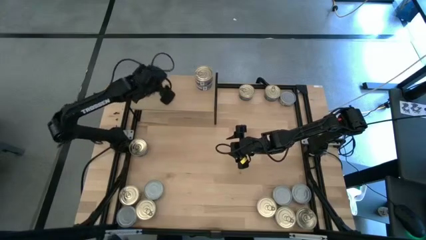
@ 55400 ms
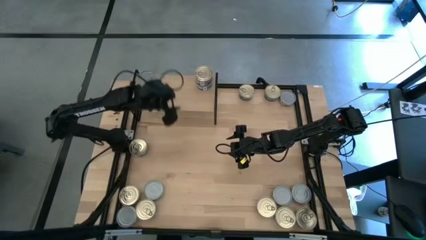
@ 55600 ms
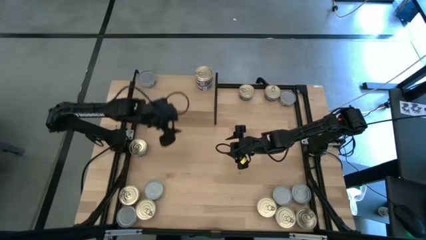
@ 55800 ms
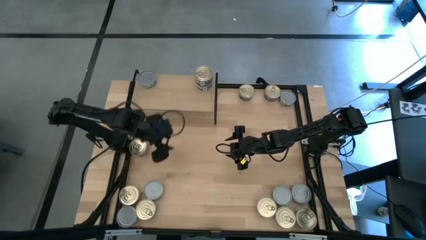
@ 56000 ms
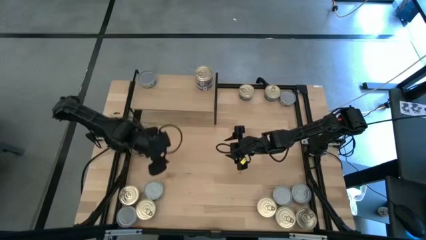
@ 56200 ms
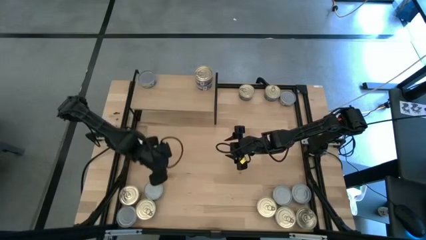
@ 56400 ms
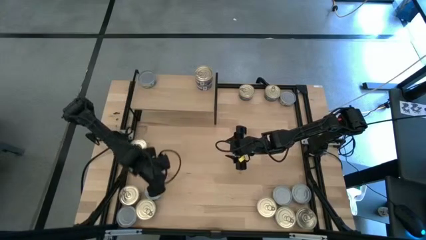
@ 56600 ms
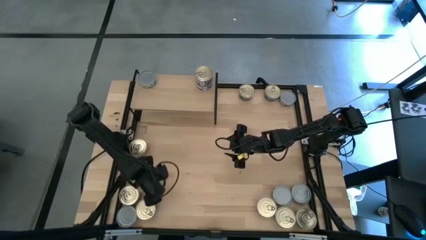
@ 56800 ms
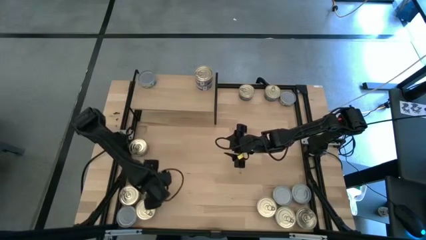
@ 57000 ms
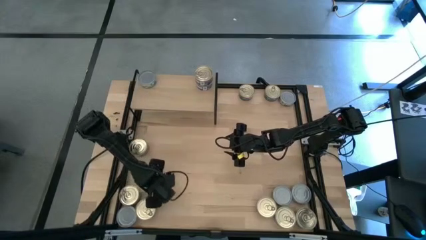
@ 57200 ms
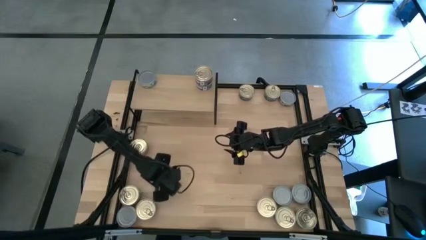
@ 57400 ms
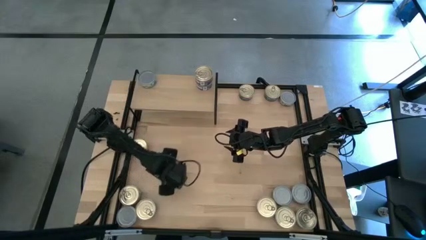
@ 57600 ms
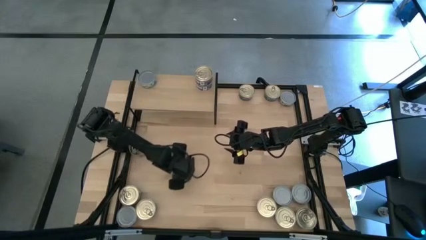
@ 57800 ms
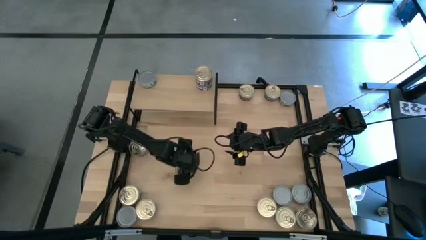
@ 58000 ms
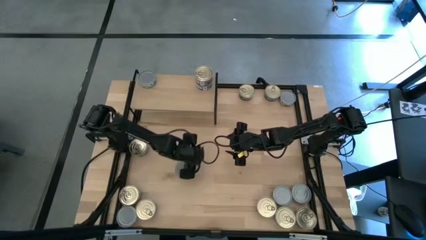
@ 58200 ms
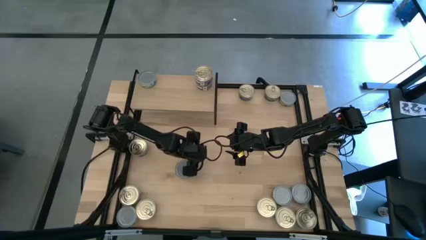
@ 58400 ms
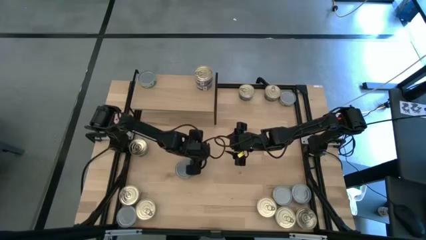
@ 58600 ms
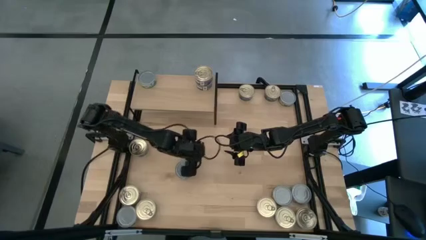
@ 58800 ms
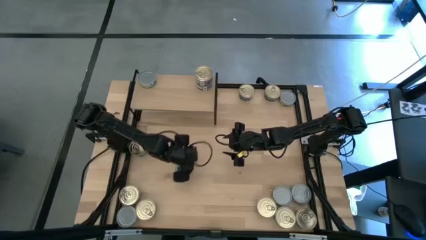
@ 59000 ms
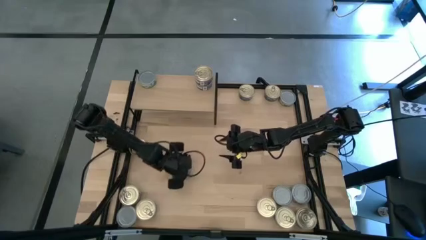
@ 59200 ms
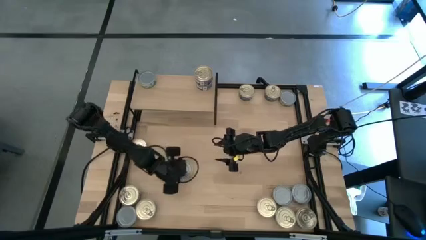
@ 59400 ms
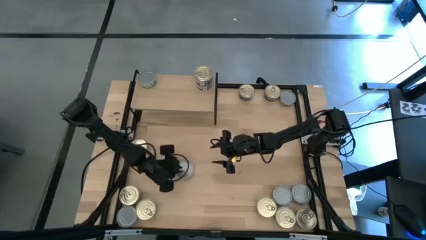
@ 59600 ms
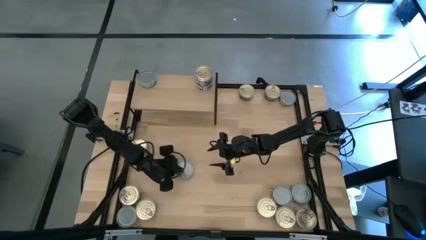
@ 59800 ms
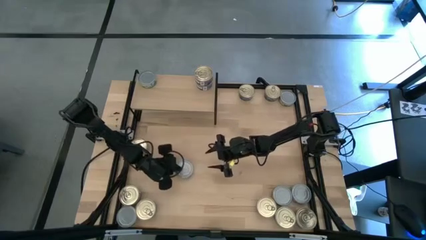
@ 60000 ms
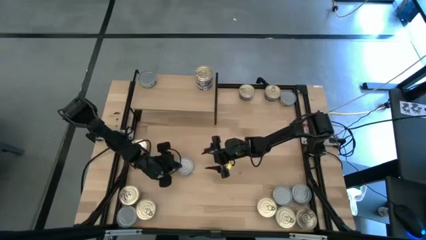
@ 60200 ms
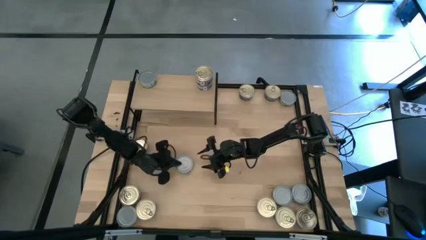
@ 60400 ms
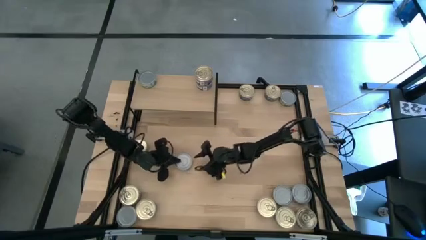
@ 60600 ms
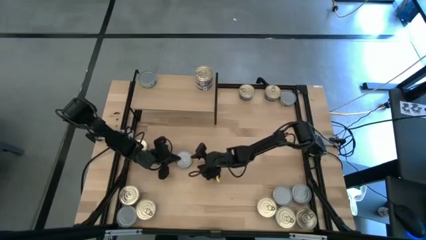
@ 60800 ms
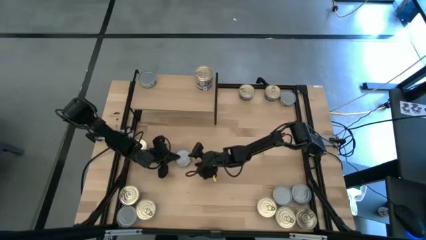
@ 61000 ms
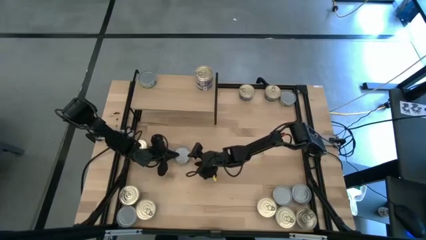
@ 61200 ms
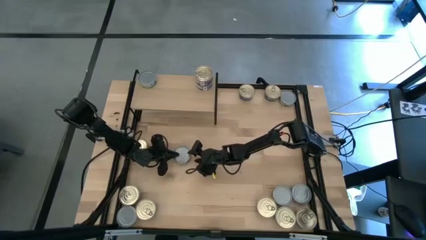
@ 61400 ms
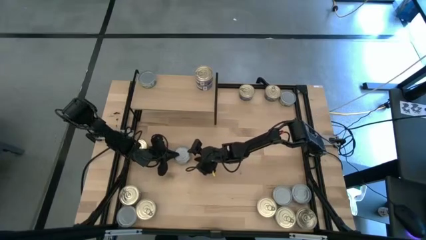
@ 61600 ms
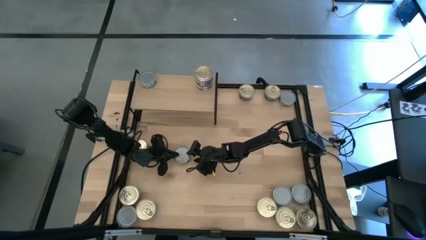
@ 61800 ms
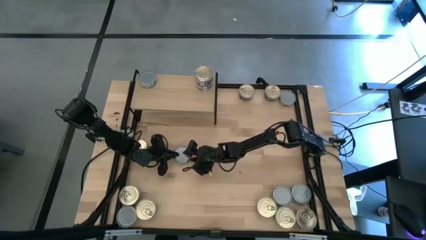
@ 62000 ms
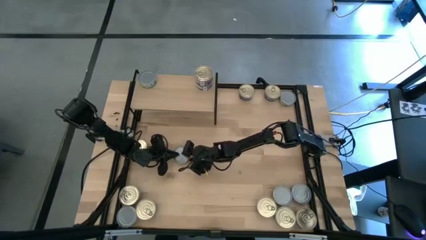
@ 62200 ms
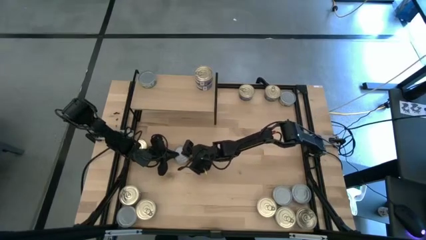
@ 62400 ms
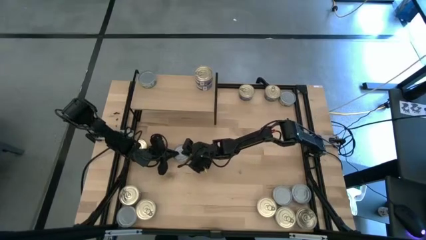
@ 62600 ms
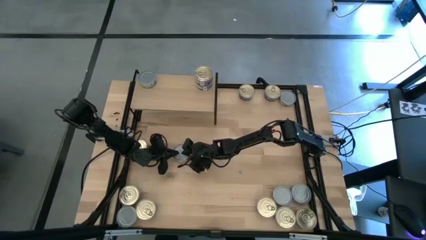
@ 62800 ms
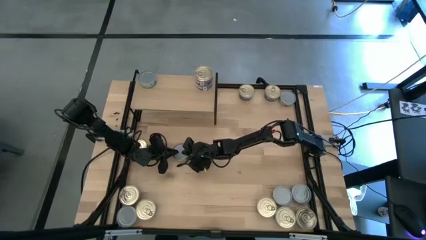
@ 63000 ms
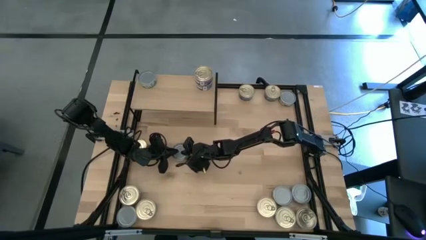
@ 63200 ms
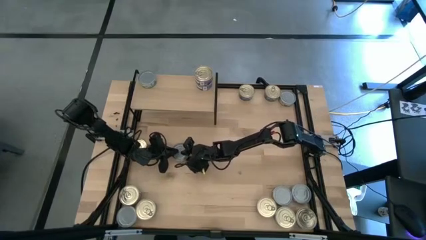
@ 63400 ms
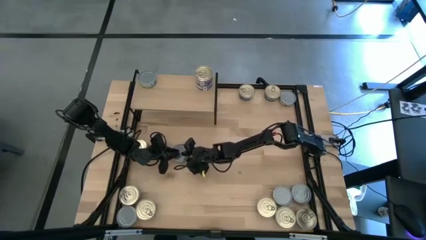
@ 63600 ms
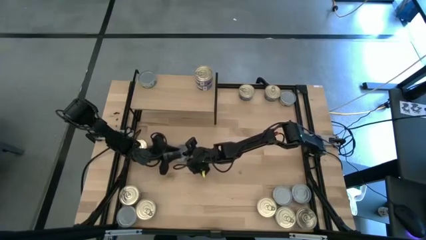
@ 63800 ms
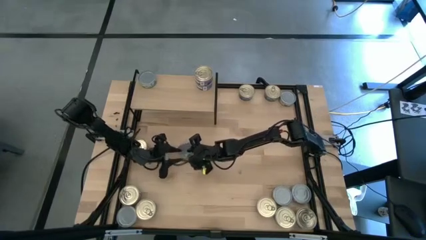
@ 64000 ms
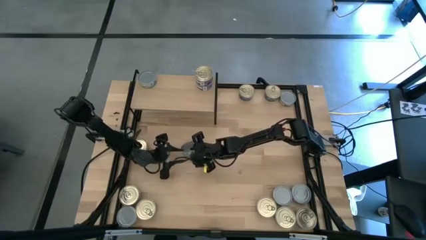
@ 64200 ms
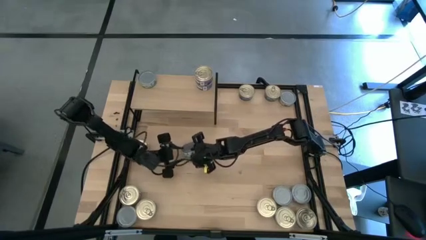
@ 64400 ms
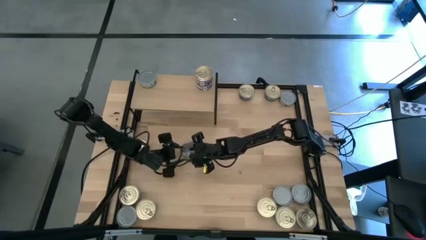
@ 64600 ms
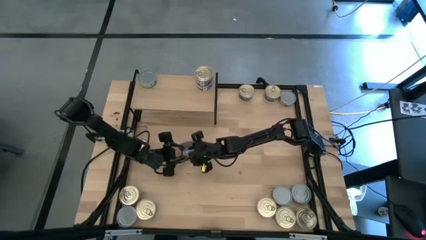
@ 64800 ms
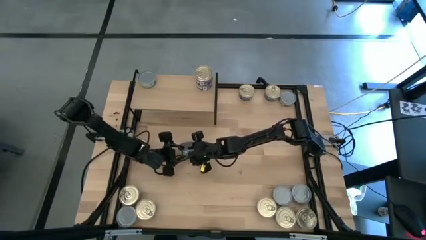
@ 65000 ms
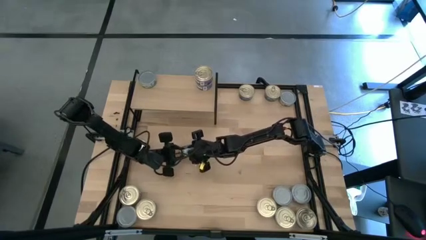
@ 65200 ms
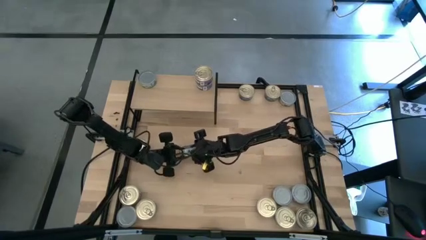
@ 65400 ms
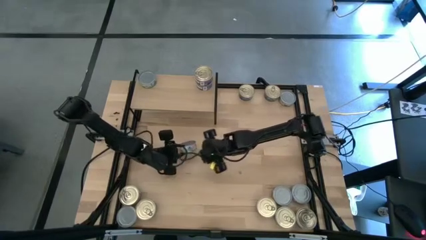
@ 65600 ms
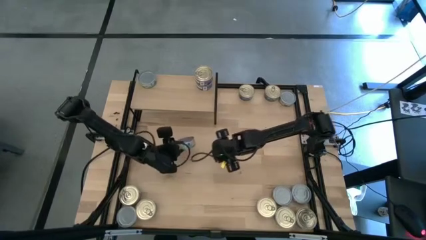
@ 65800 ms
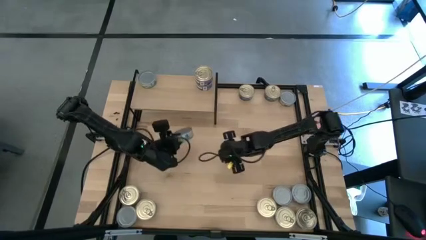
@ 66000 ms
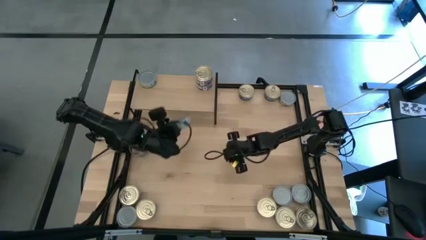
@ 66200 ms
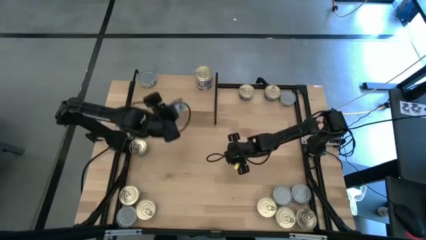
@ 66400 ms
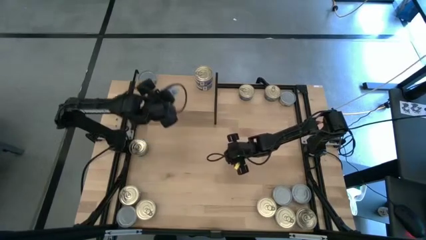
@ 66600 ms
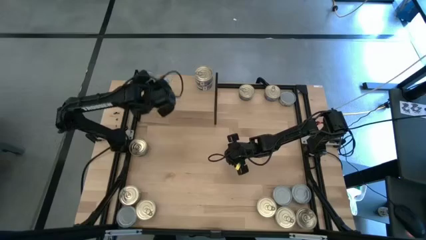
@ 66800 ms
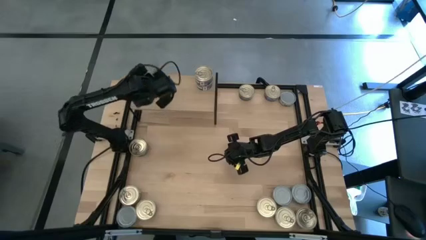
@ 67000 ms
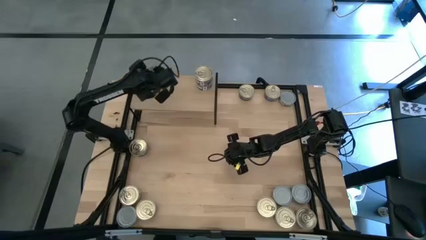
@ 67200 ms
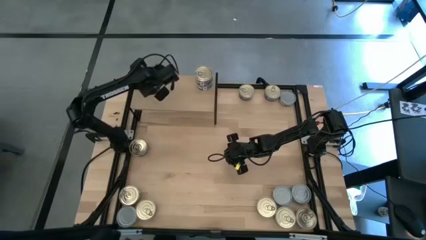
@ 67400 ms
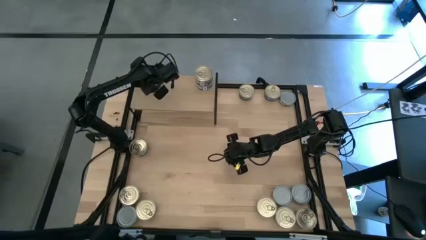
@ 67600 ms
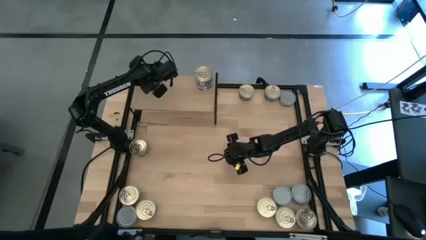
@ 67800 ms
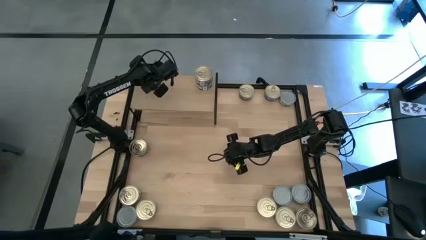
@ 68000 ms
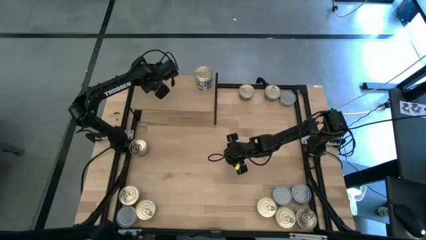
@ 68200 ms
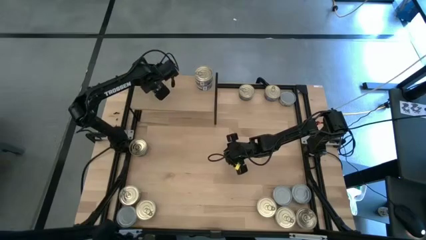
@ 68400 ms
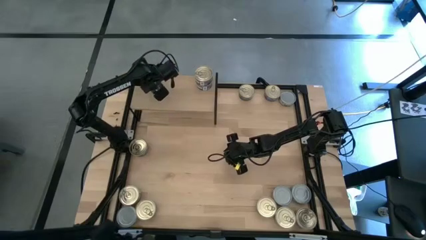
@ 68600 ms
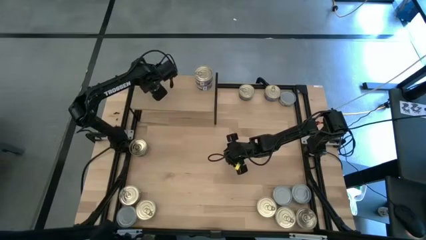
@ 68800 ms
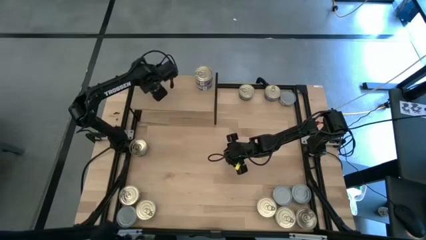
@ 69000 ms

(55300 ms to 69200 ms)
Task: Stack canned seafood by type on shelf
Stack the green tuna can on top of the green tuna can on the shelf

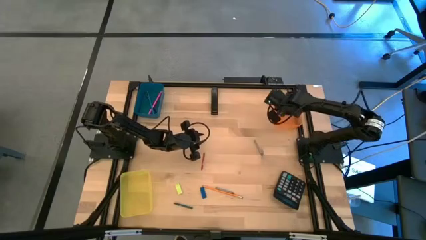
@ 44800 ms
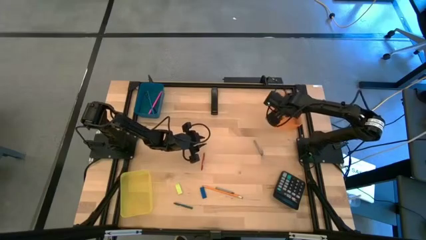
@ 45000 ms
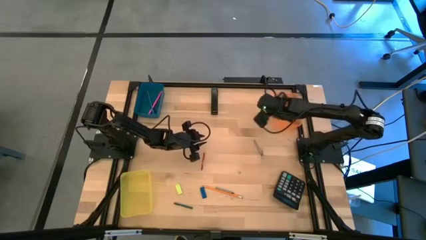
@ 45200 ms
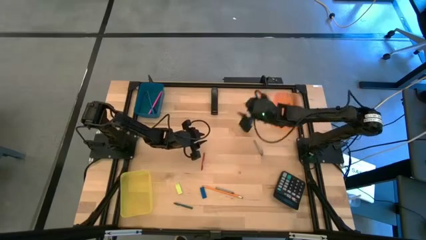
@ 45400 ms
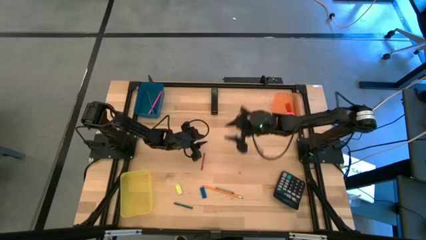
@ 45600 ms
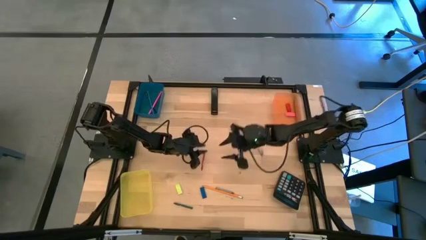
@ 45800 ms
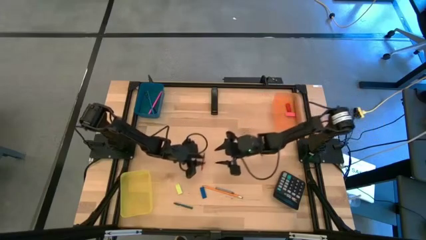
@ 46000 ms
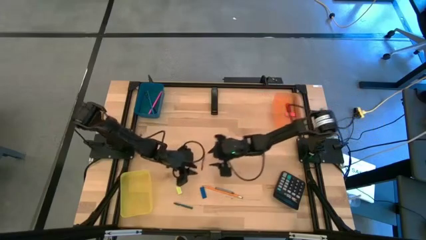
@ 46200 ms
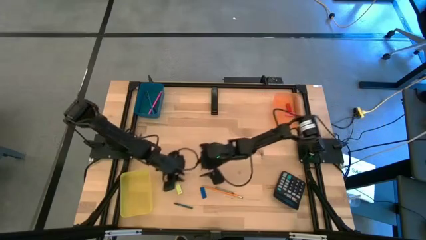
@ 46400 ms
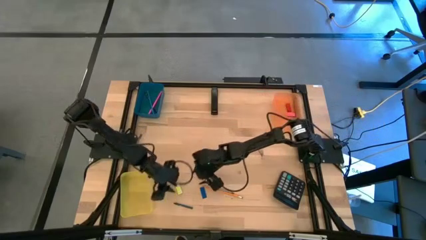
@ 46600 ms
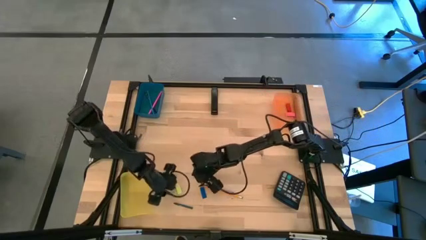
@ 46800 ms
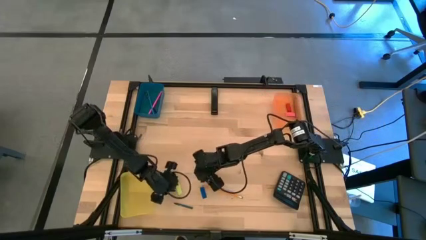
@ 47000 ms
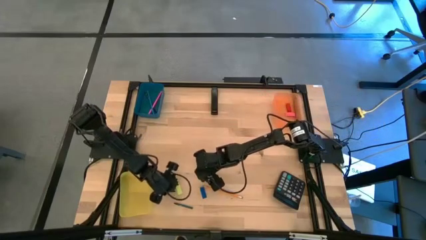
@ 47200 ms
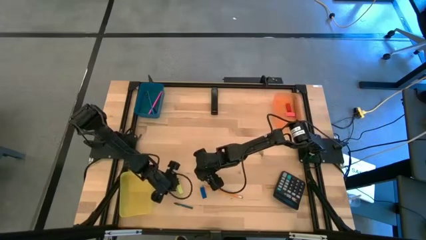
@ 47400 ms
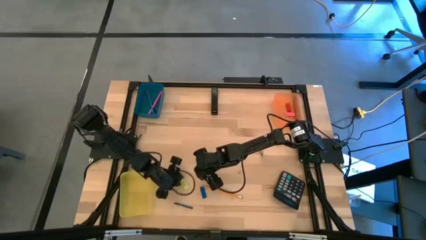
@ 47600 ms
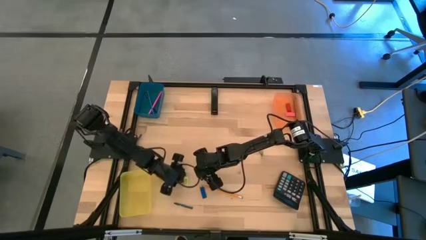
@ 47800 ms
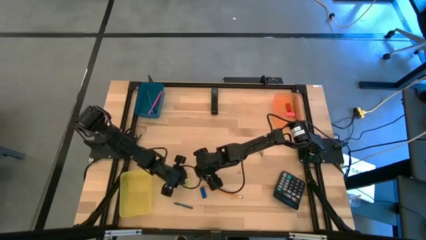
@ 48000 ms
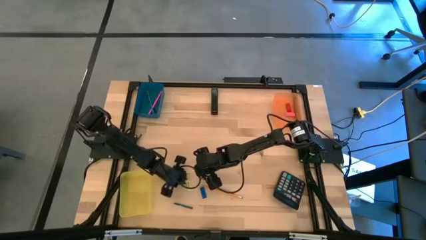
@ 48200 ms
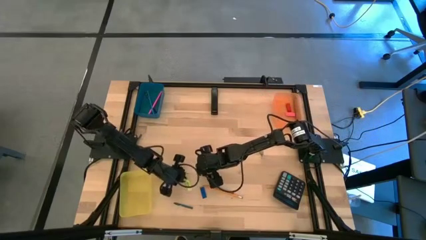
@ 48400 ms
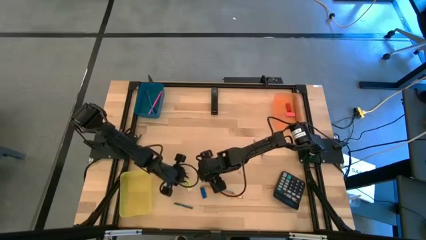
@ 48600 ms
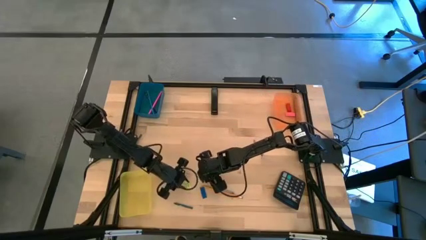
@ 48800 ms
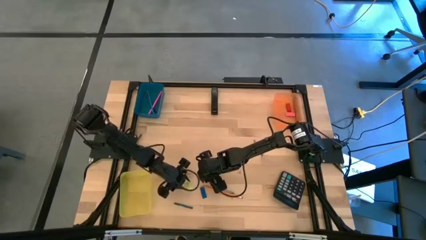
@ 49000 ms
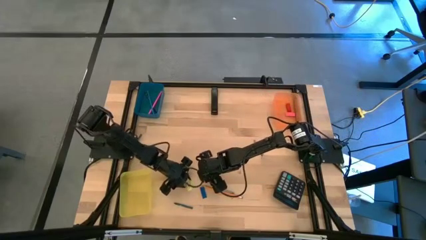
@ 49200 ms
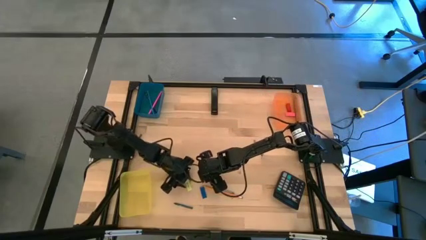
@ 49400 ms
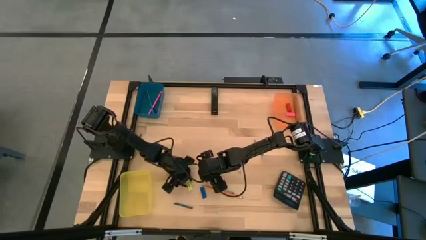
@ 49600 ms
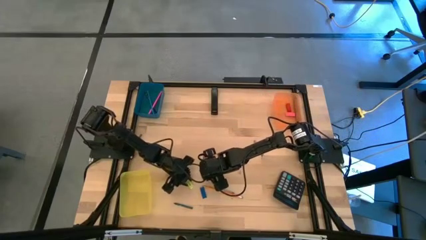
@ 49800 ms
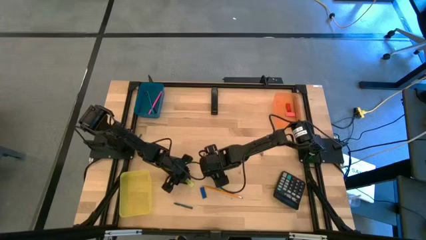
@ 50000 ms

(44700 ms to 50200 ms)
Task: Sort crayons/erasers/pens/pencils in bins
Put the yellow eraser into the orange bin
